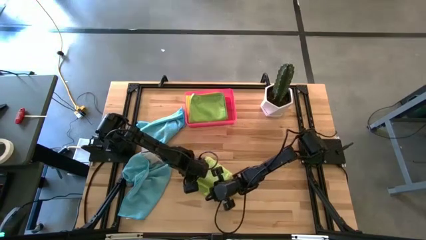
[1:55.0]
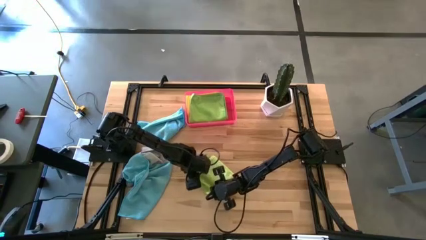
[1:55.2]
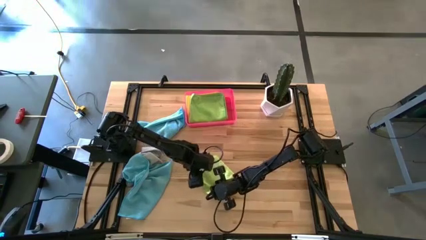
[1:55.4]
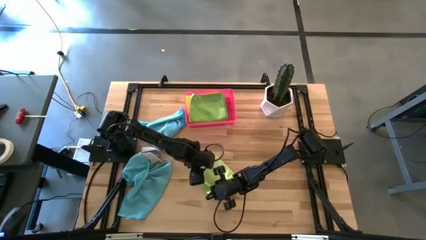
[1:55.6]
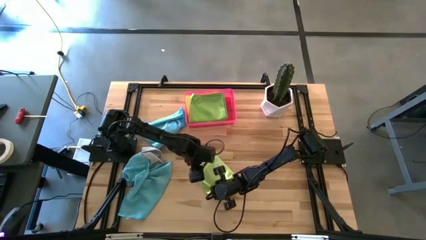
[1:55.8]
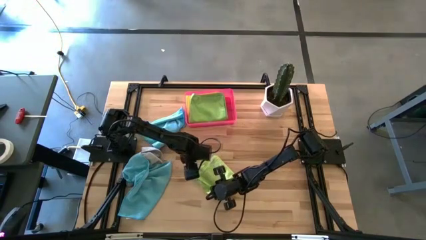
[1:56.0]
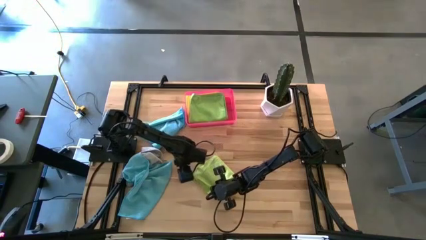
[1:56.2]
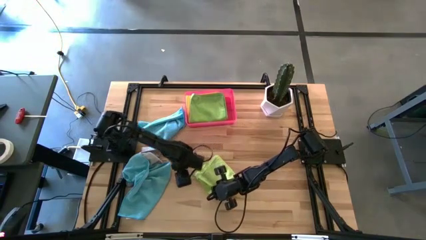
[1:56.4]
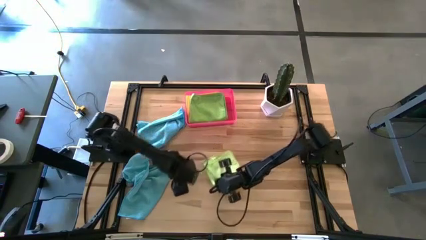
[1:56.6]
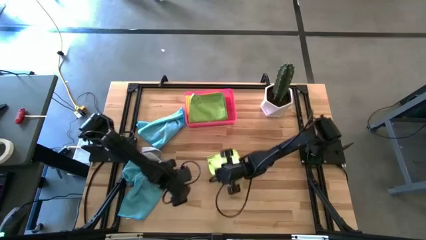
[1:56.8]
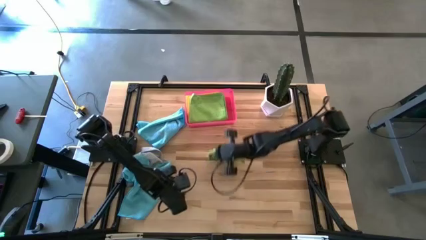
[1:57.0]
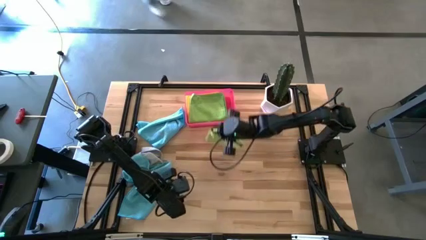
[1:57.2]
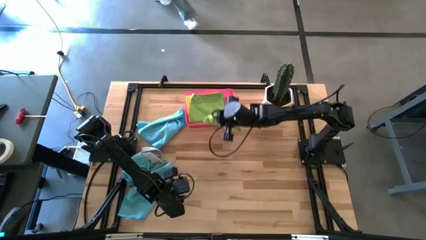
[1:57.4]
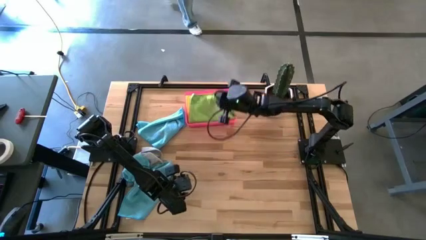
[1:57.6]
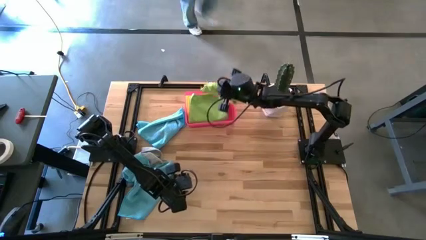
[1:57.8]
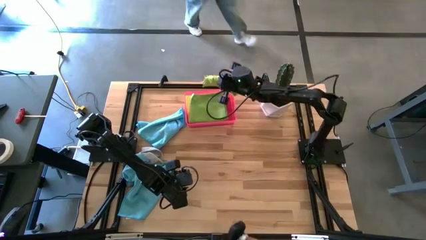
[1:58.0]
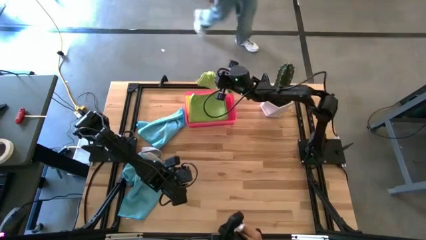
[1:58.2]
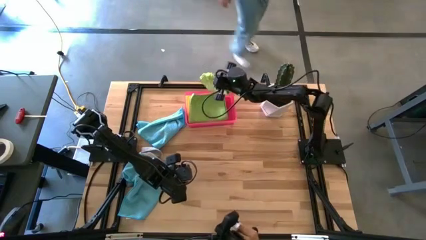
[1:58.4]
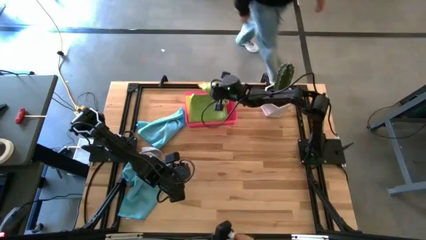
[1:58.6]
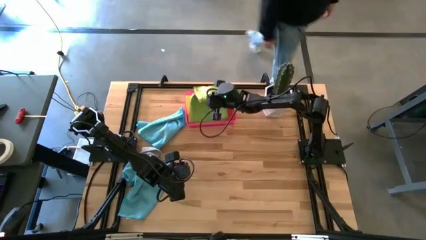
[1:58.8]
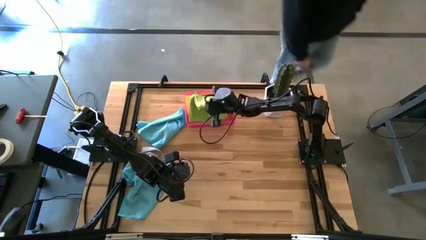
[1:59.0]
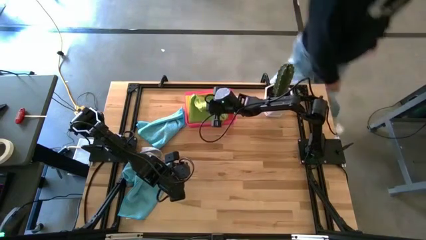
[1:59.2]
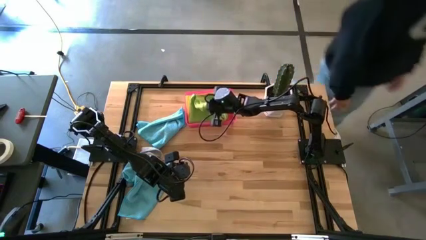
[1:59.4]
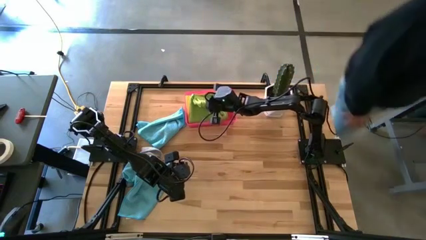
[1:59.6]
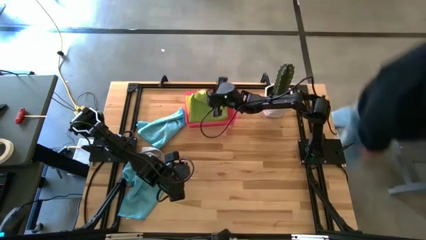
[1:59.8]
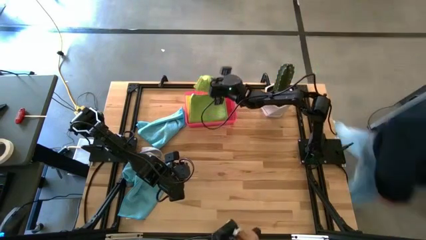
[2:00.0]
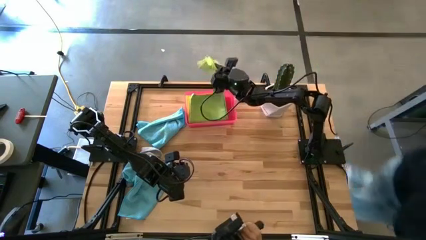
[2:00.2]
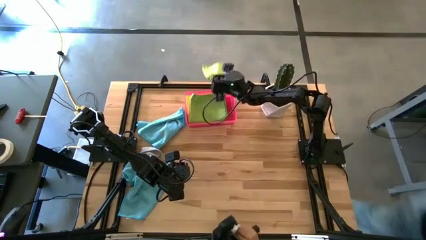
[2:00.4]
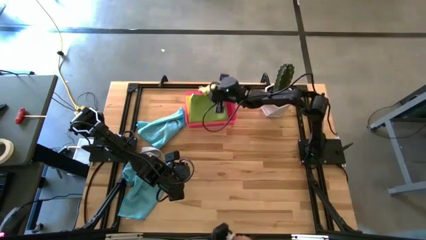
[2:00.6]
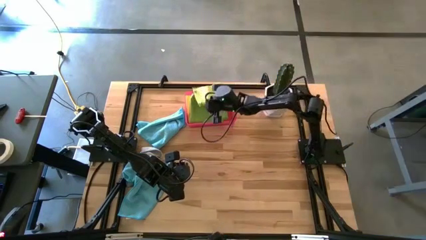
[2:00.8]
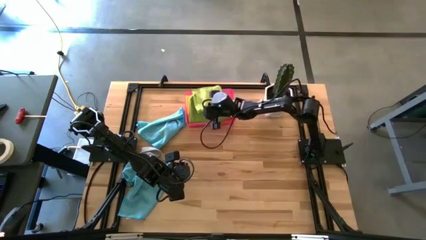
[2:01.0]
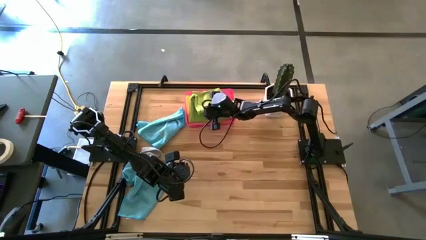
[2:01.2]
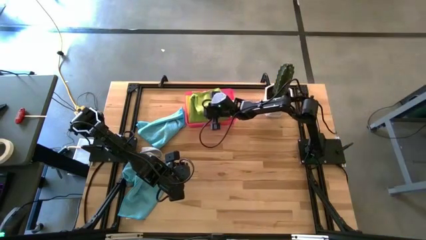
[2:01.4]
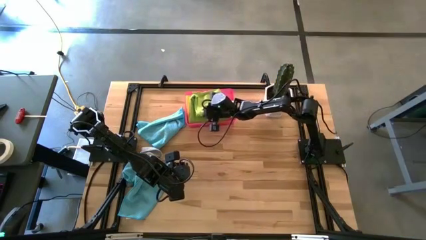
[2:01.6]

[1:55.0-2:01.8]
Task: Fold microfiber towels
Stack the folded light green microfiber cloth on top of the folded green microfiber cloth

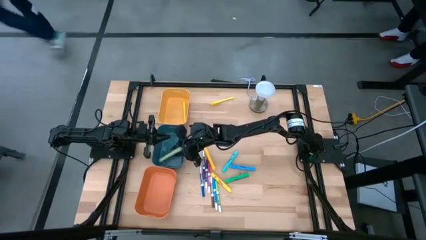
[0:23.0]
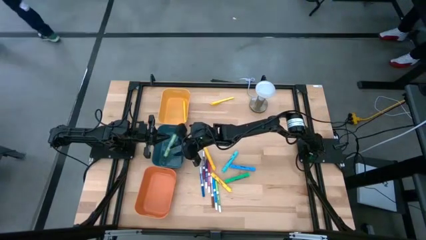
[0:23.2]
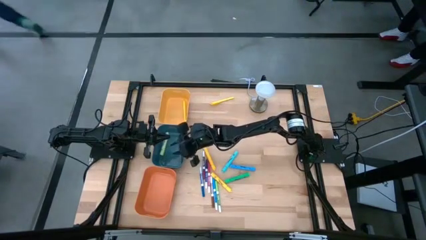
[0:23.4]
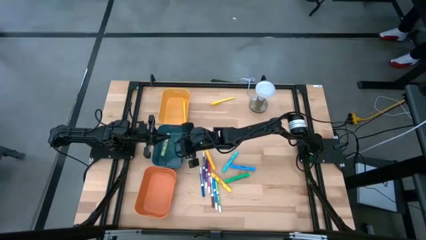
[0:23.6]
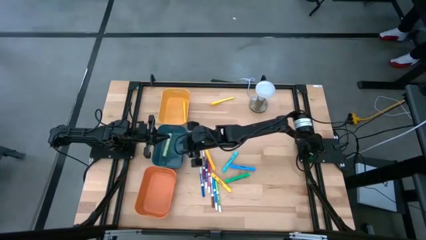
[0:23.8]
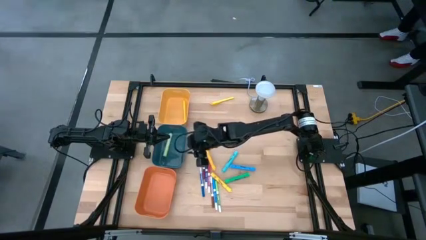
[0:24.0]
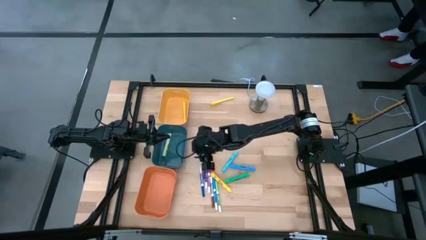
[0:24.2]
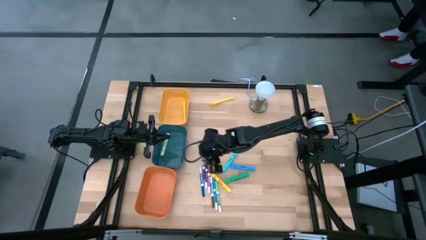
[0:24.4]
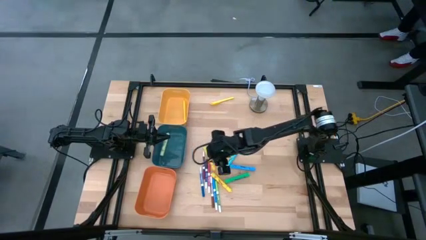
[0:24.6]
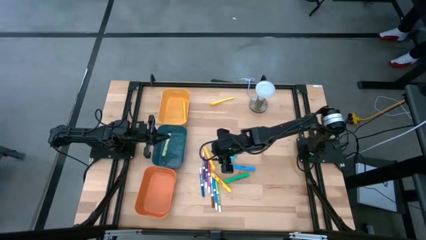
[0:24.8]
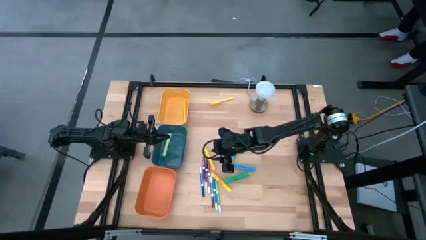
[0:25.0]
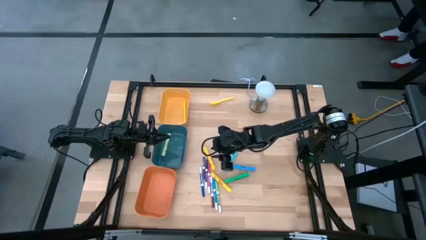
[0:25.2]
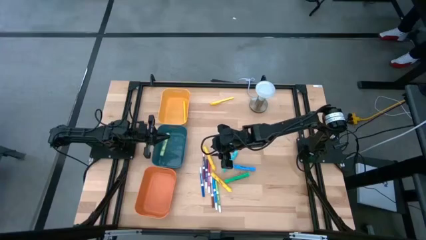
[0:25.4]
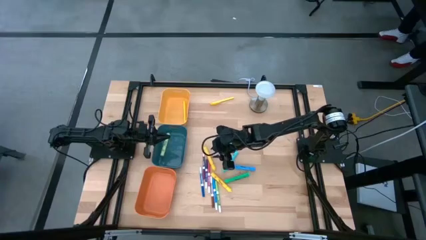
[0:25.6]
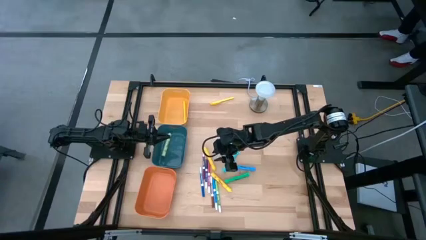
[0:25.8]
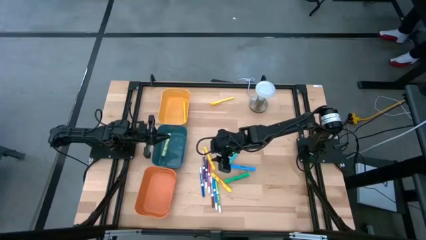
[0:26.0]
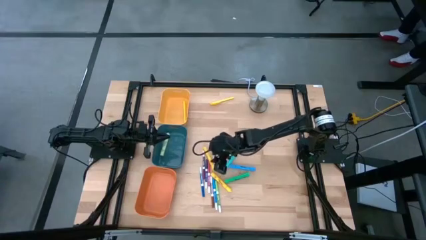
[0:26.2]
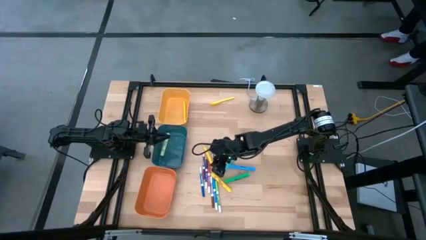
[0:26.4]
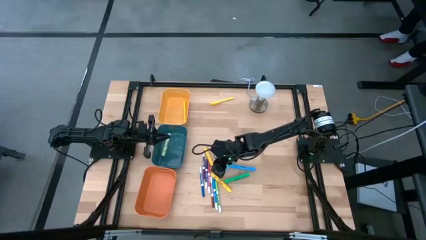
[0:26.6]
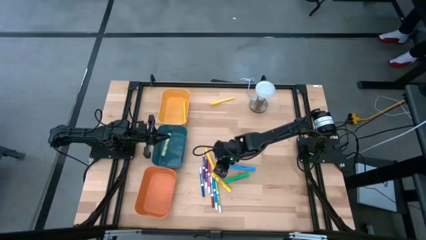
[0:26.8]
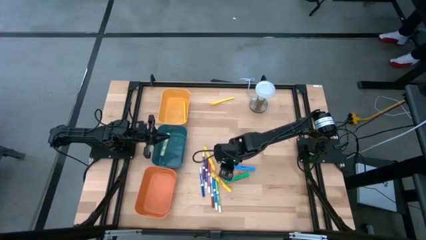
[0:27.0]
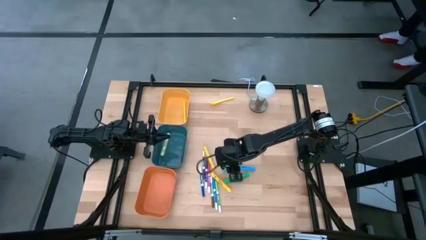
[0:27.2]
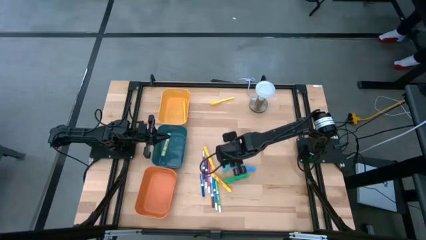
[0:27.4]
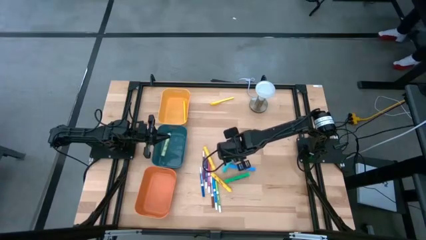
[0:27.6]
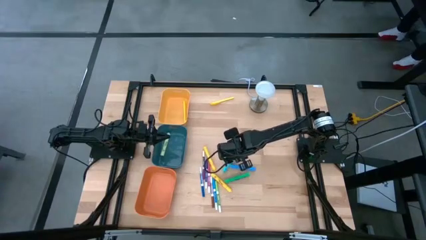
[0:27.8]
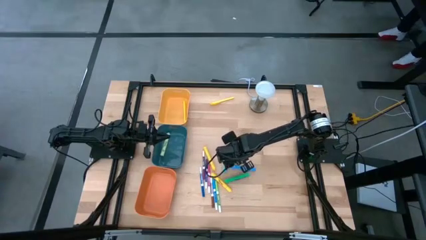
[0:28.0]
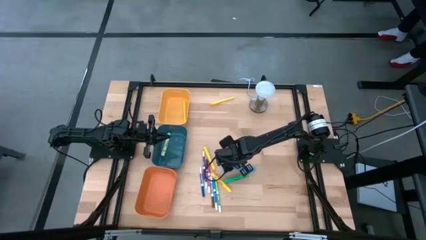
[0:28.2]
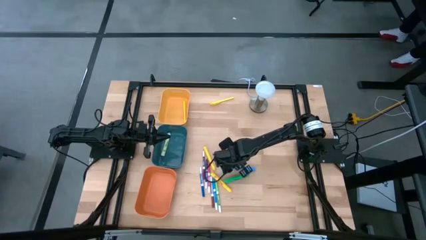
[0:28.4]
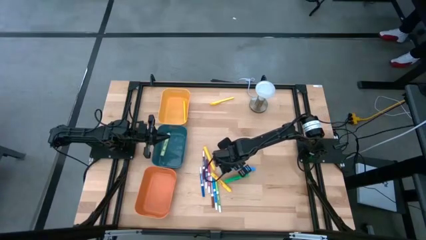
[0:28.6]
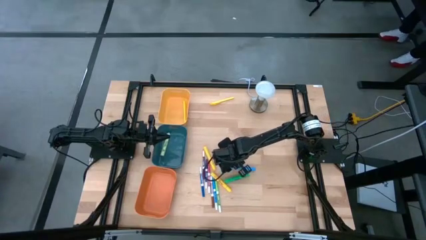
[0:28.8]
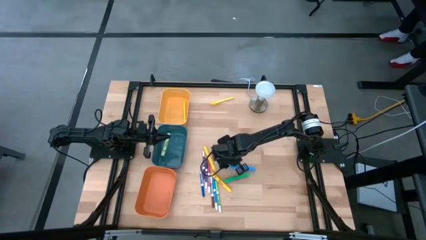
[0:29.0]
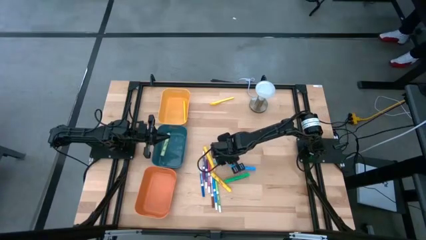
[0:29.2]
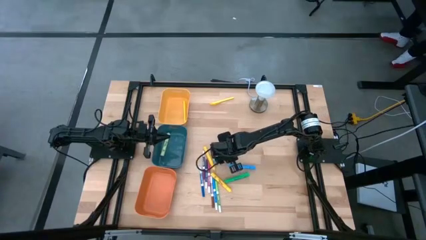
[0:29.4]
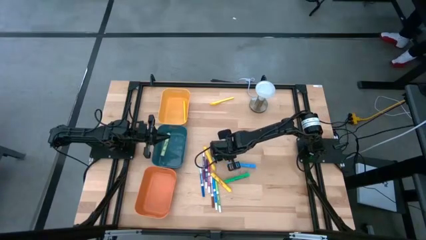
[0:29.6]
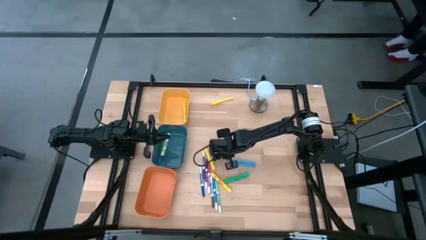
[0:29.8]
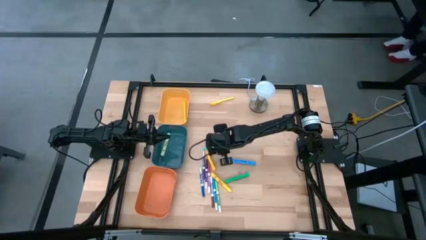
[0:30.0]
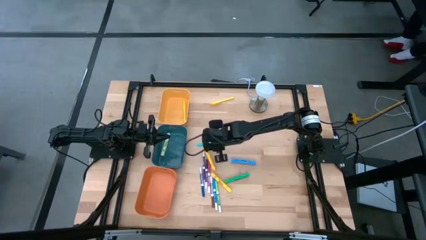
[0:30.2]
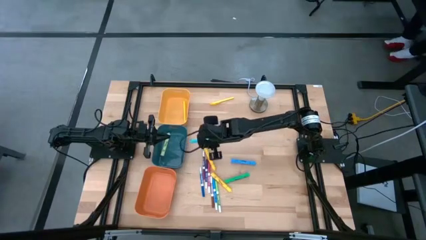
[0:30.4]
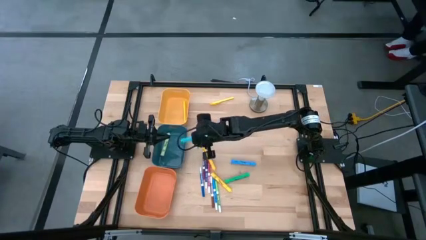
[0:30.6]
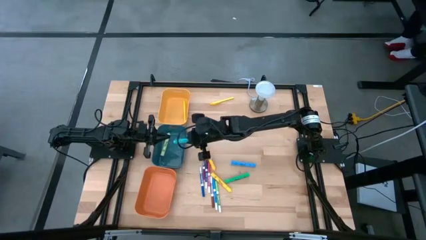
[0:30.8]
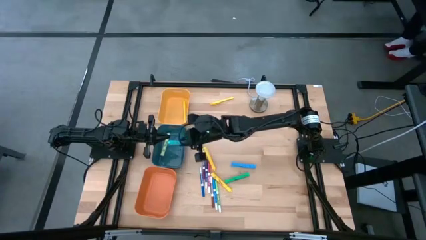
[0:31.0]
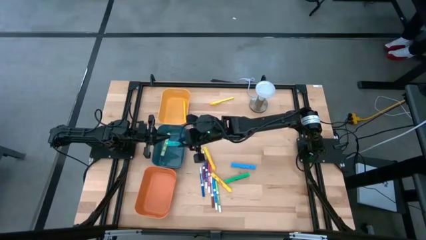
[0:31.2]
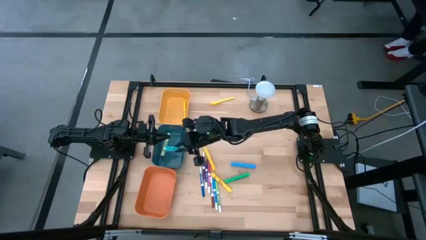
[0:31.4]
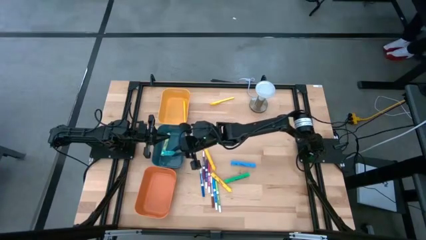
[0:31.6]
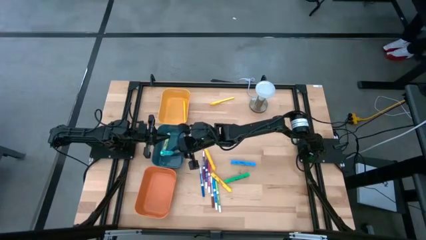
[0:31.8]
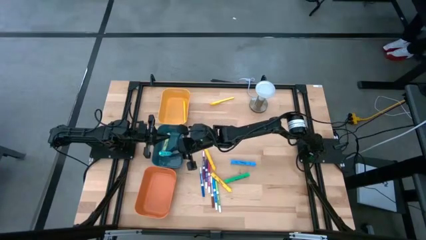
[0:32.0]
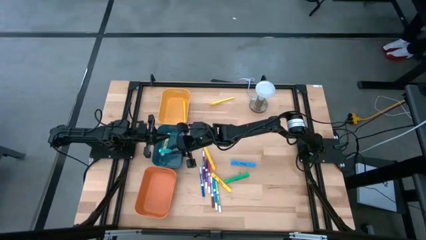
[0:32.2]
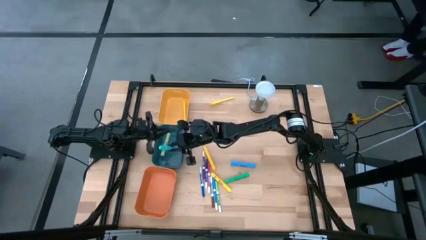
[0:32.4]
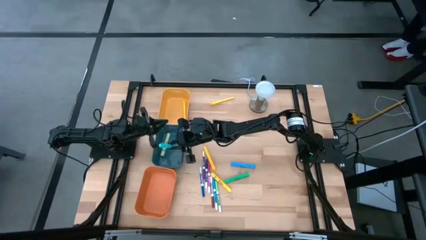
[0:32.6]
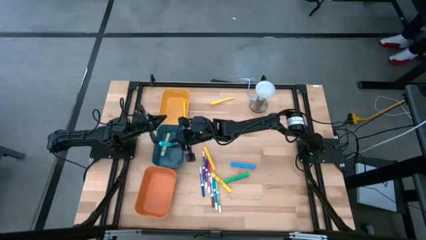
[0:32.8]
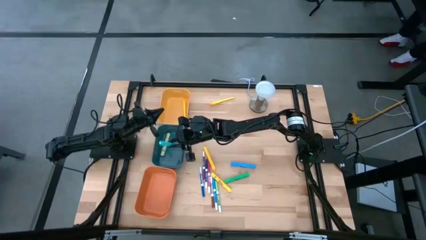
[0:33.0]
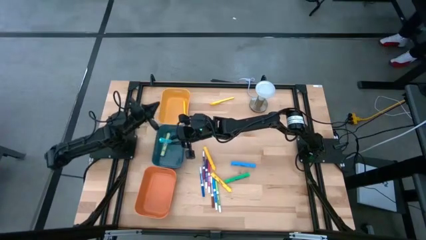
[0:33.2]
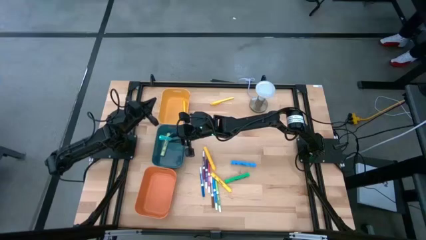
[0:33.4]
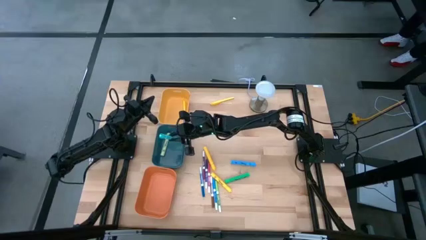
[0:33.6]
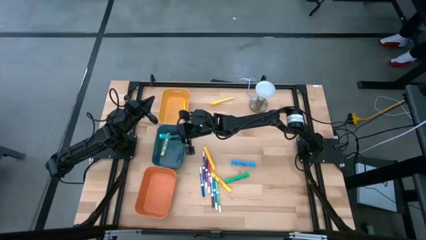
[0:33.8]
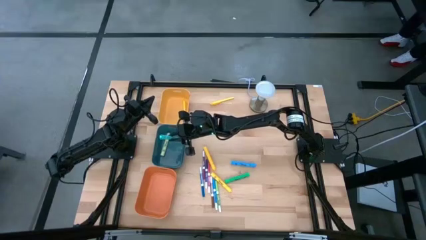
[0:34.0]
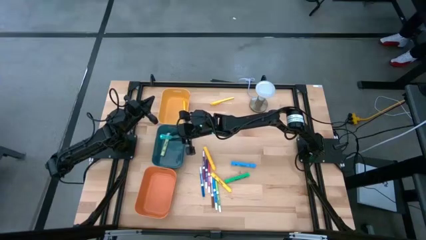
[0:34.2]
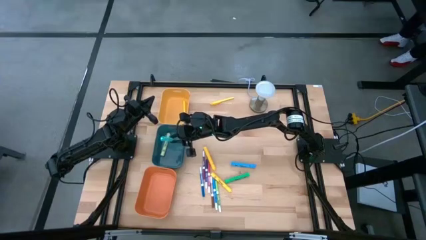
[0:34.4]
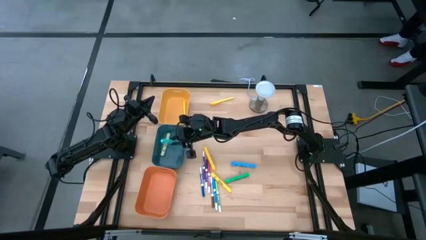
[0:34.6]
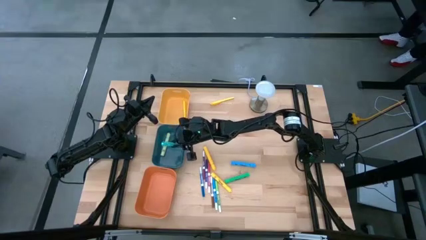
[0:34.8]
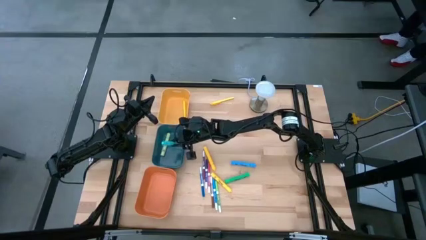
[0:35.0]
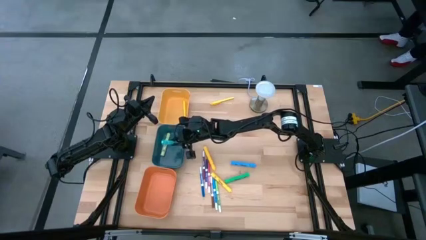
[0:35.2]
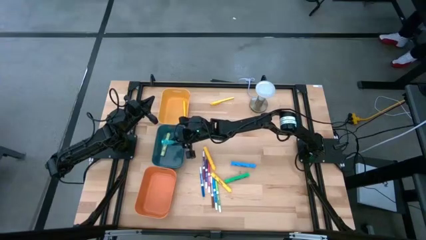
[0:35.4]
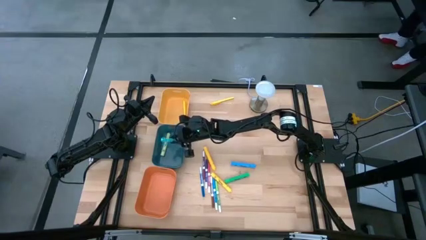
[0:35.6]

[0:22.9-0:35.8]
Task: Pick & Place Markers
Put the light blue highlighter pen into the blue bin
